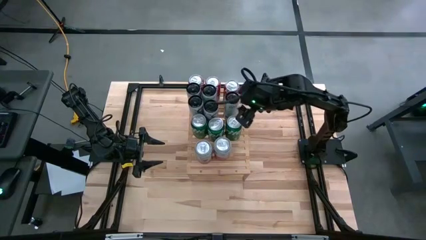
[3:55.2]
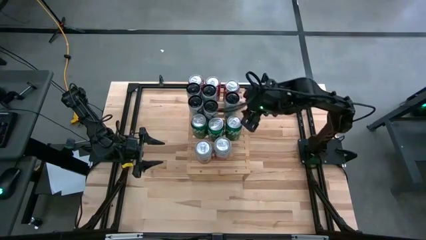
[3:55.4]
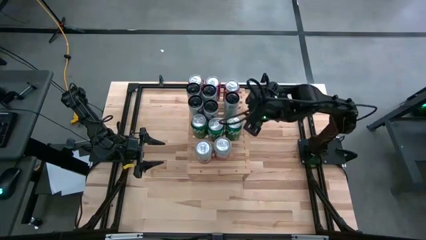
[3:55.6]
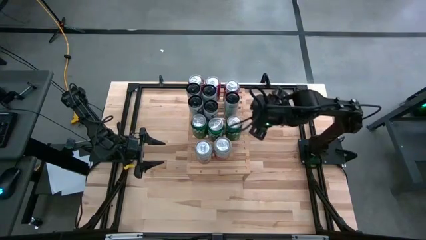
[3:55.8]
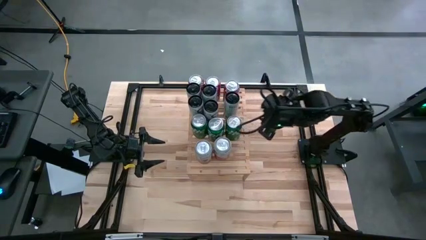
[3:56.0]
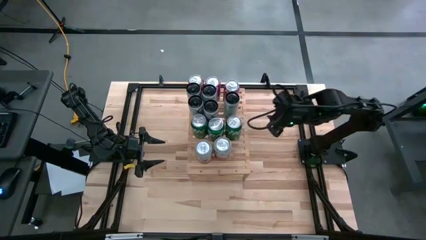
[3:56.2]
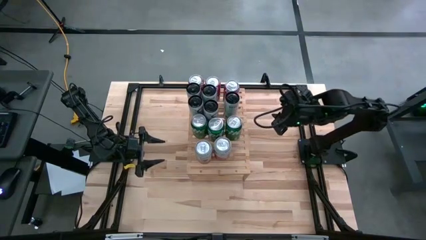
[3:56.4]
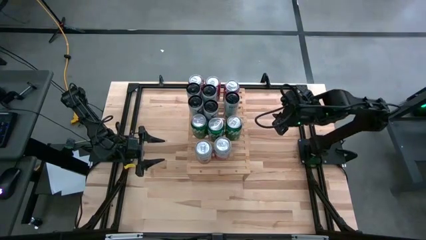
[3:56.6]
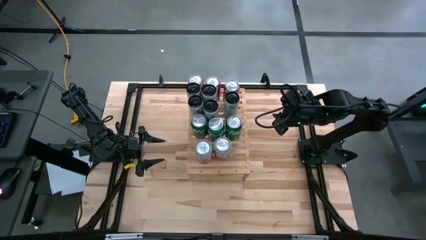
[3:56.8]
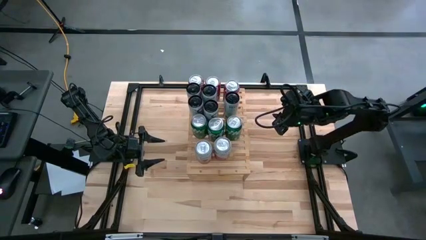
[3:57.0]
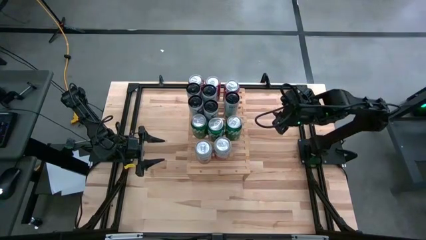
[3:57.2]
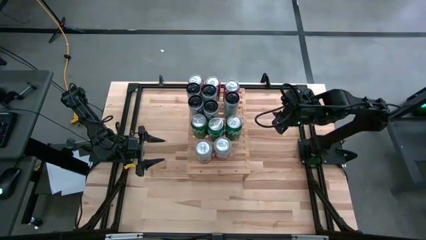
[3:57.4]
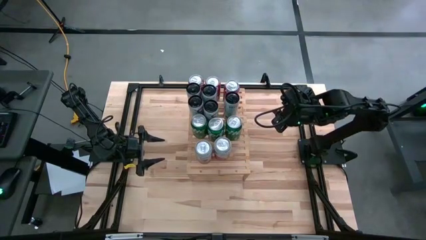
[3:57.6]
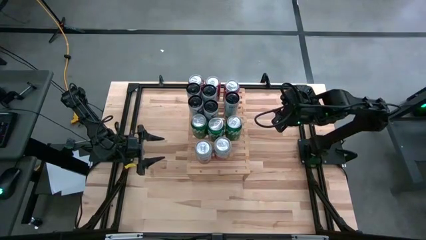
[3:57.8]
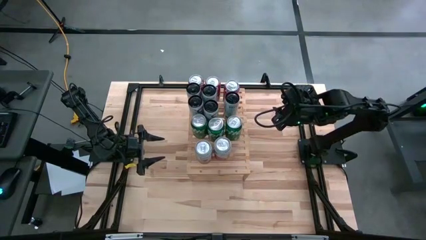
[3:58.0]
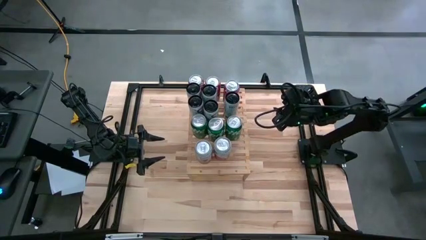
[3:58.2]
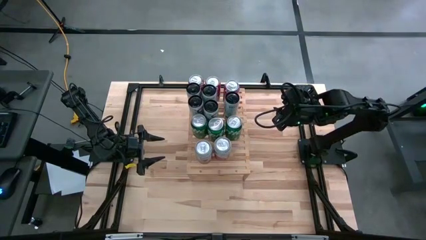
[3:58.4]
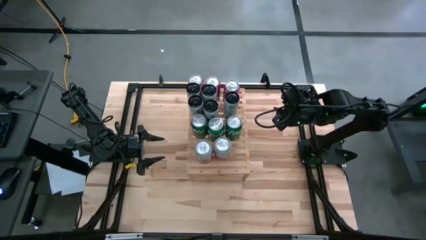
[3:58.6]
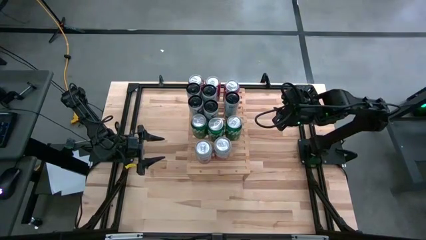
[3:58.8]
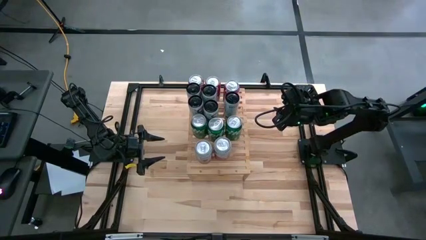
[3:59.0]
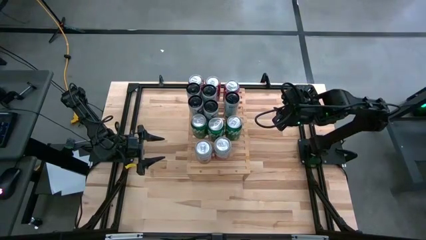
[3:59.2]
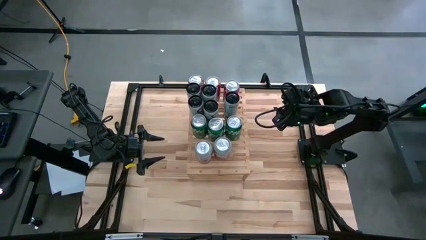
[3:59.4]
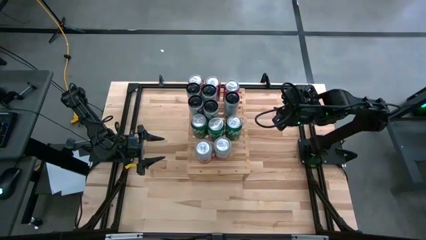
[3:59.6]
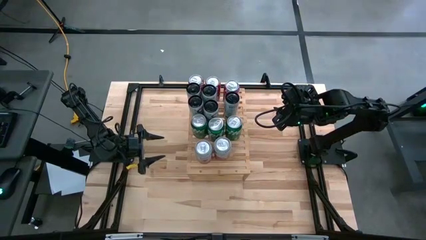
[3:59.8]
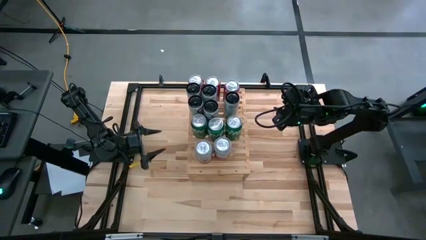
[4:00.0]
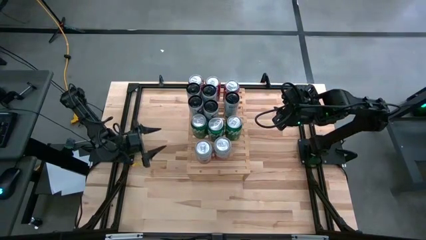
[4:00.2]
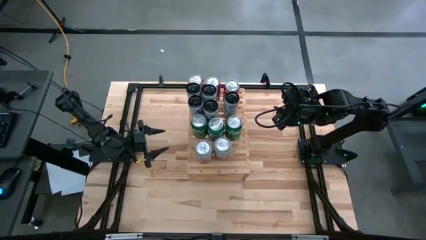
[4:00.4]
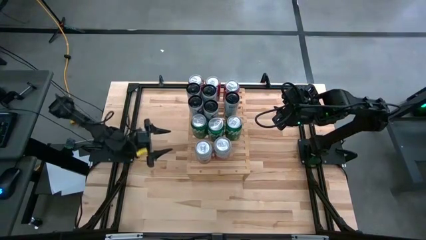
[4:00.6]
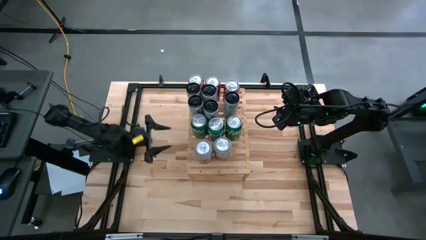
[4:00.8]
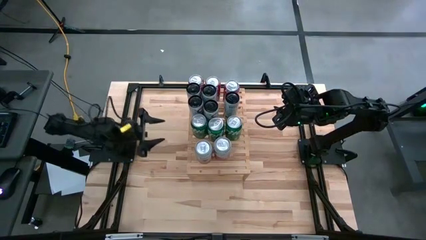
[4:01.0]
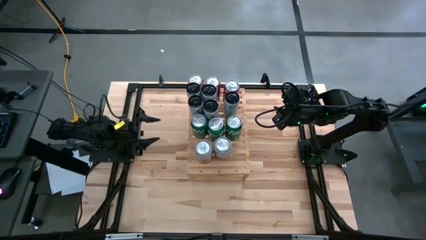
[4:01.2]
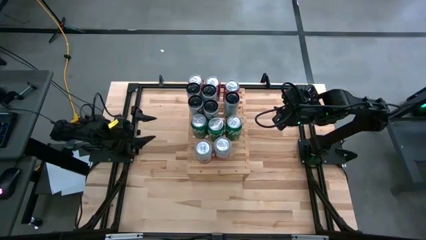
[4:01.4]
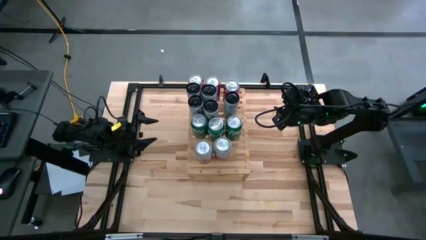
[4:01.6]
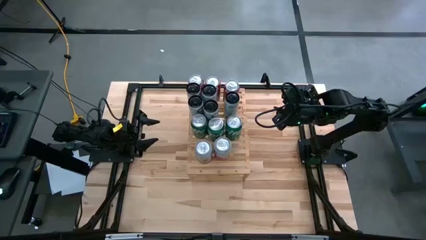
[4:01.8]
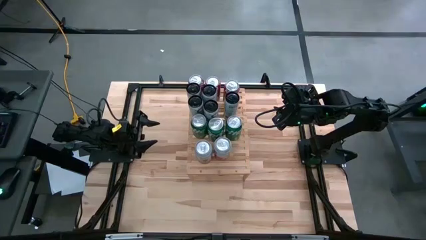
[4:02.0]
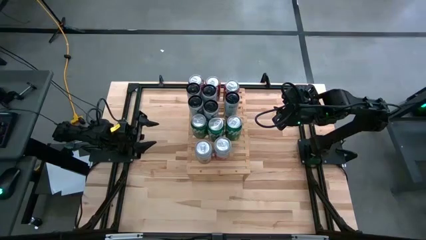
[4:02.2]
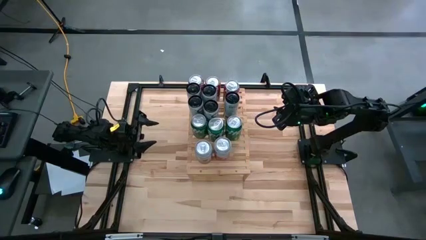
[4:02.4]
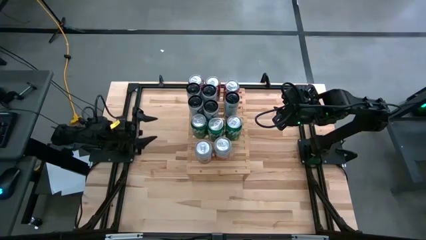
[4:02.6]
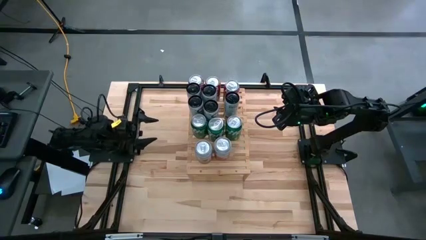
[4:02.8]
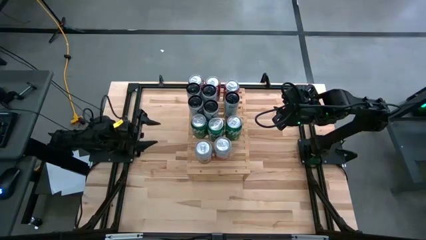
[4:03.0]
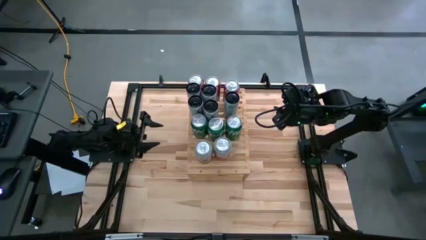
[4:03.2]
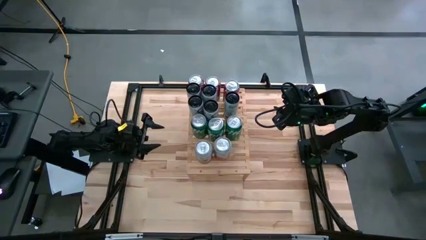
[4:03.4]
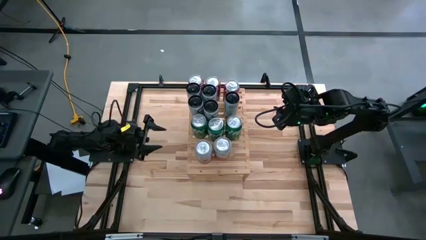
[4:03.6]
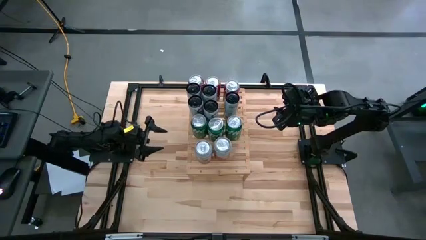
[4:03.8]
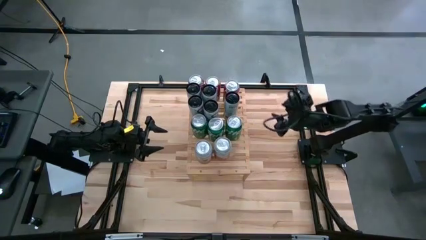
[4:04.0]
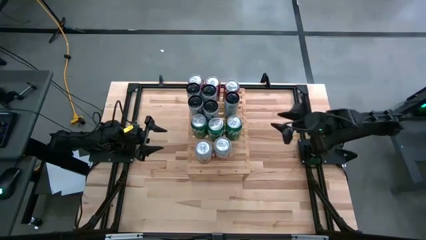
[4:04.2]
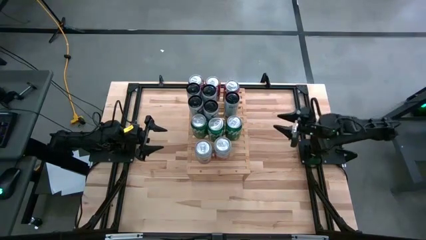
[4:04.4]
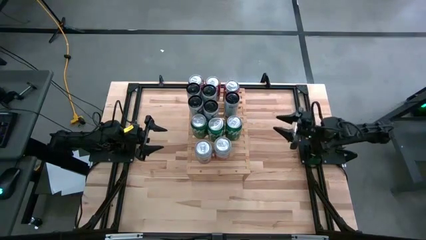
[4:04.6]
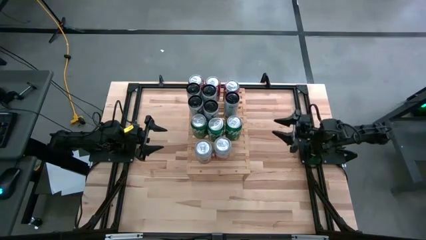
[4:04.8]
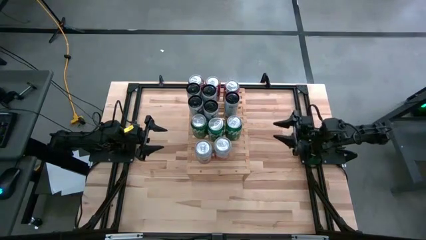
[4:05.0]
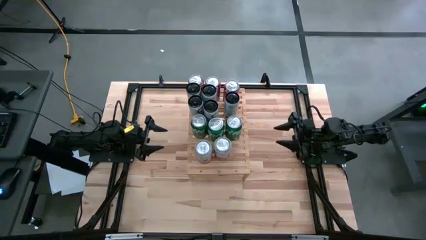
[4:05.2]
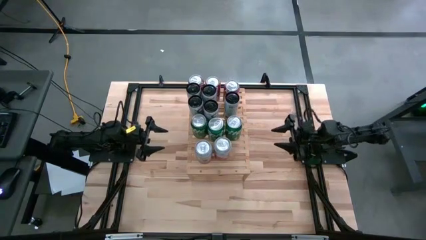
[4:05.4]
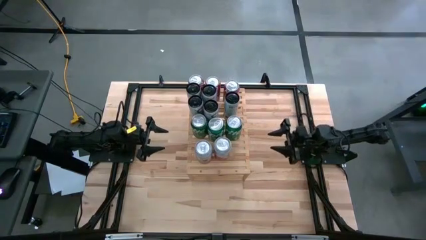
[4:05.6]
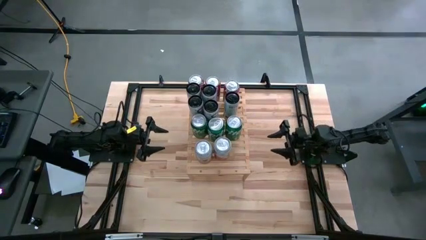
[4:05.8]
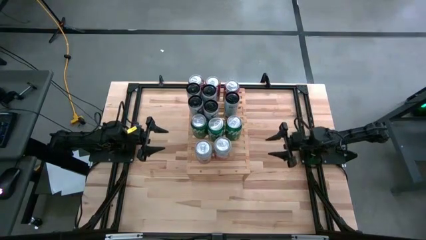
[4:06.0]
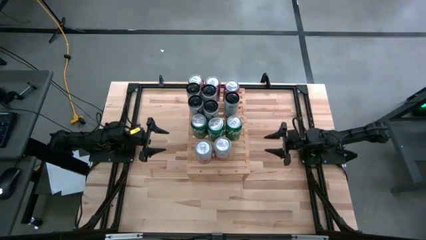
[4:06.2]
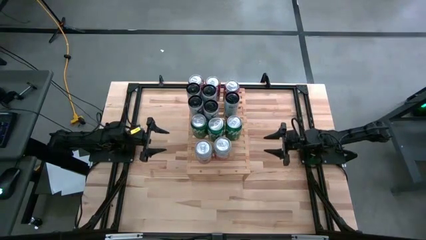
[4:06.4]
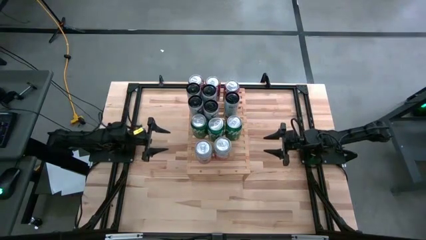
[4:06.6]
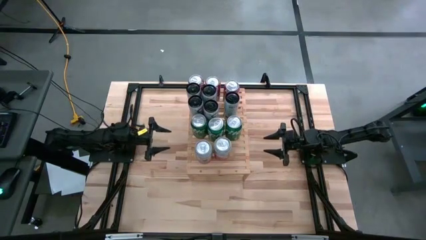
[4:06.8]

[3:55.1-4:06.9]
Task: Place canned beverage on shelf
Return to home position

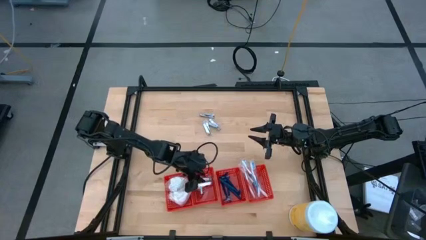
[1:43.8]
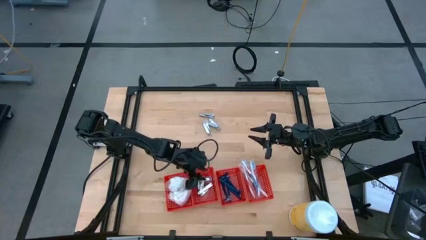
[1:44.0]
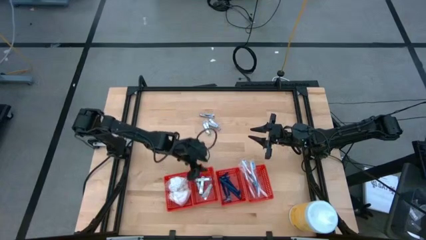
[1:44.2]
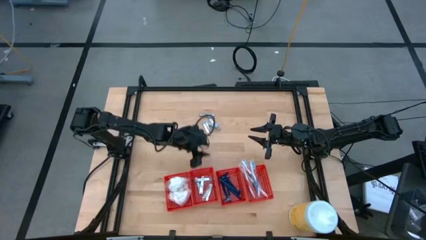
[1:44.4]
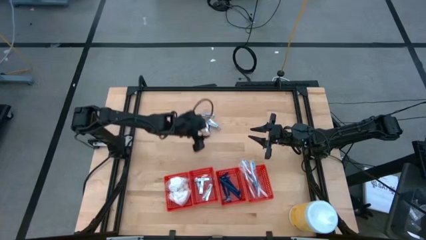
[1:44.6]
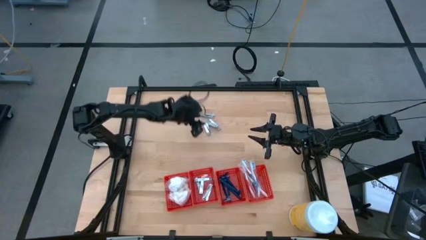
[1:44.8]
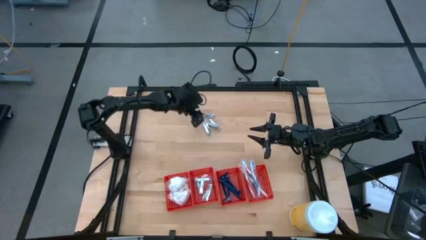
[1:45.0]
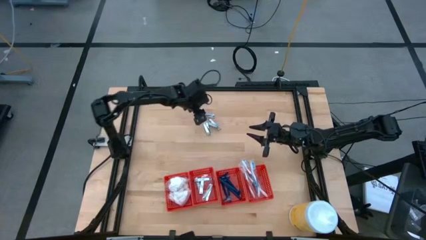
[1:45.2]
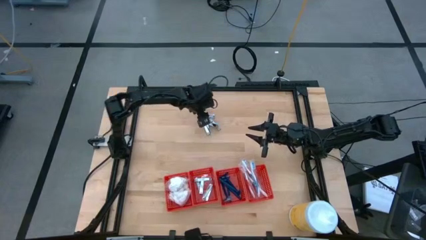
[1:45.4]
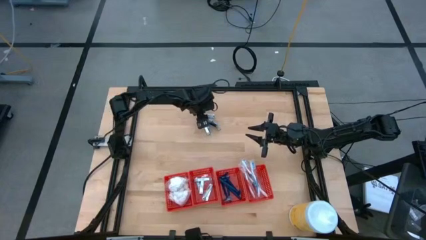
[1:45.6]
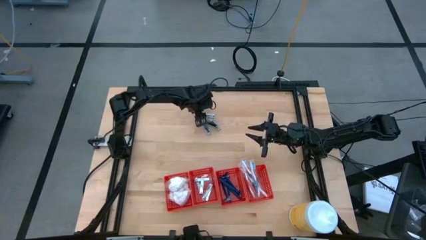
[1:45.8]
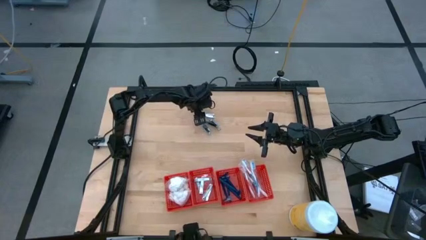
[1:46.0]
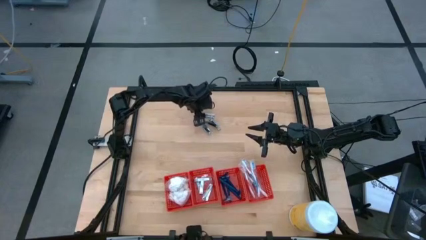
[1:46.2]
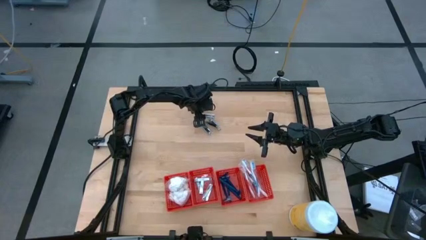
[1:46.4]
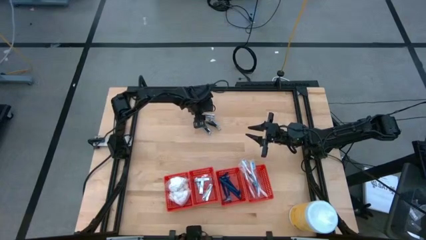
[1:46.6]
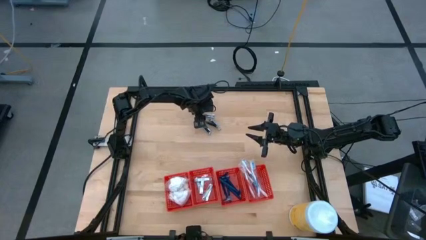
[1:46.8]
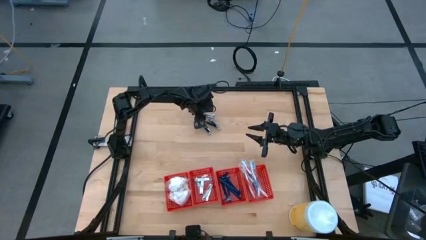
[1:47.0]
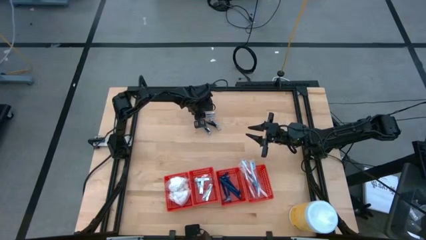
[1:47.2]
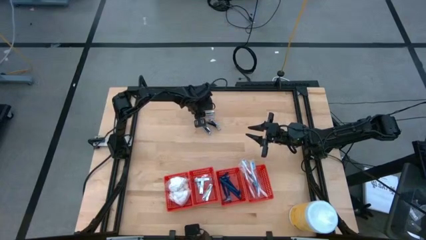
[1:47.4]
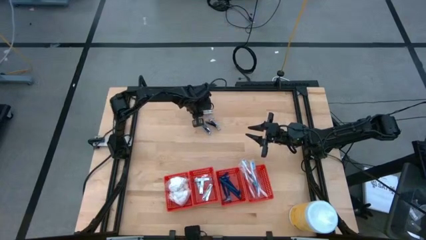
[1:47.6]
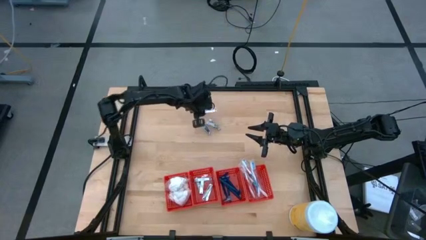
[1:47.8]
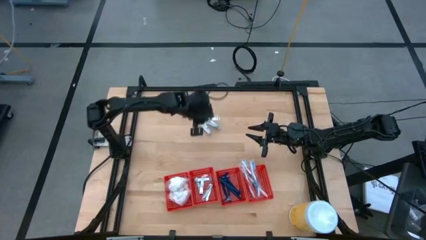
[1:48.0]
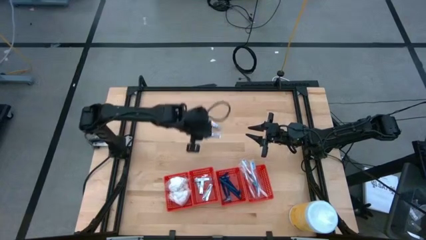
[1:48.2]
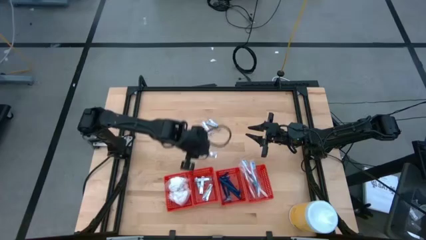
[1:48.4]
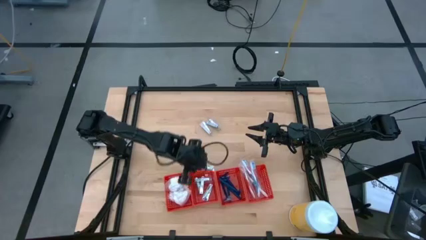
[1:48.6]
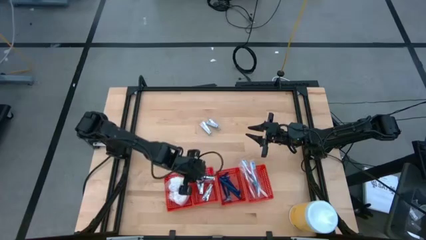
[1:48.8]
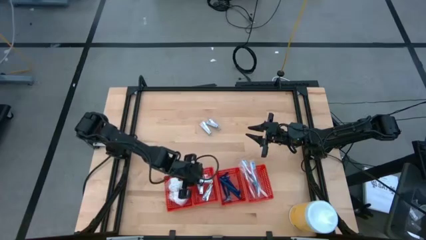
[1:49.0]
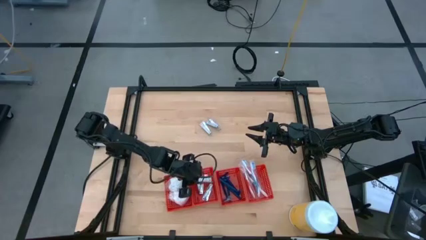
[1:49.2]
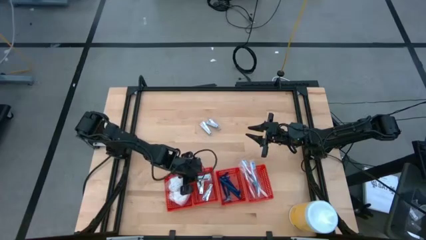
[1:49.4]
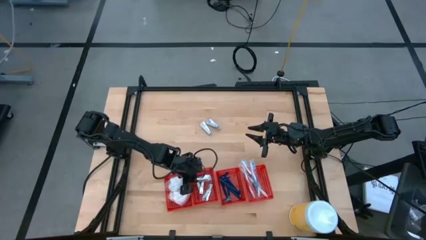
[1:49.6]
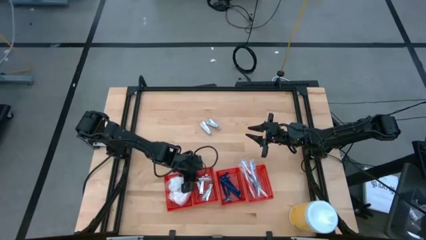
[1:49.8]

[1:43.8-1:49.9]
Task: Pick & Place Travel size toiletries
Put the silver nail cutter into the middle left red bin
